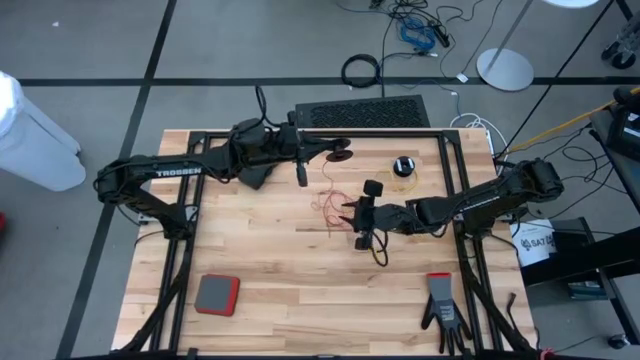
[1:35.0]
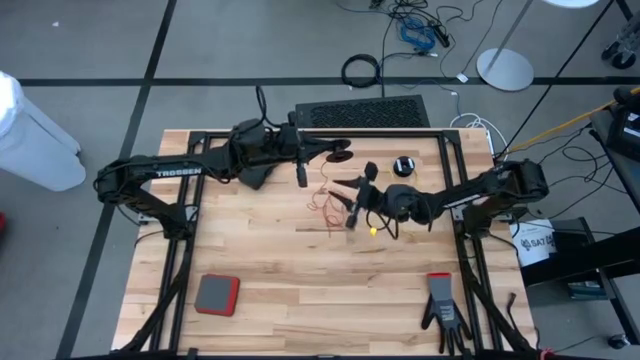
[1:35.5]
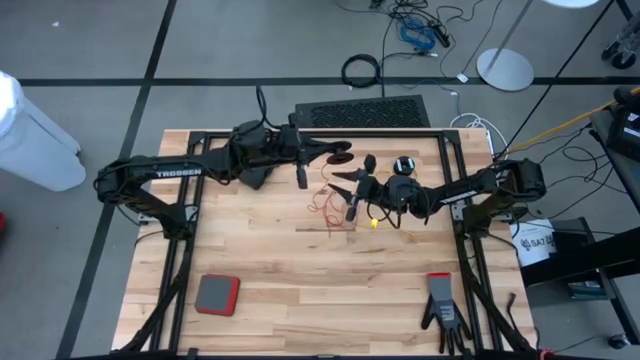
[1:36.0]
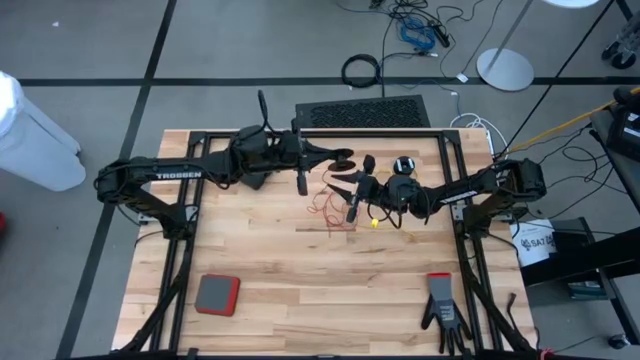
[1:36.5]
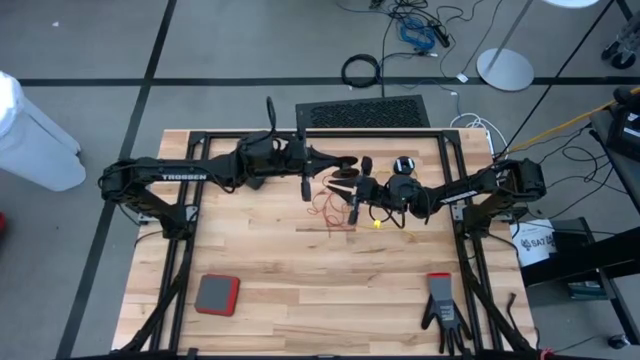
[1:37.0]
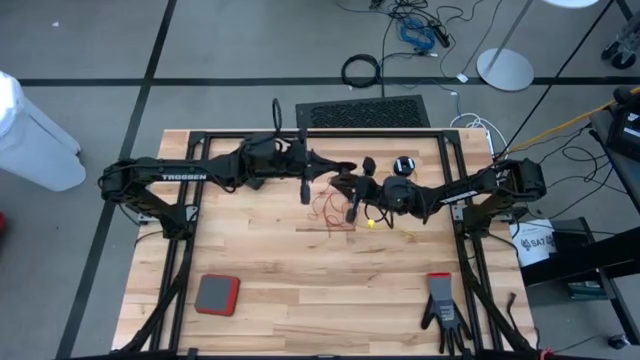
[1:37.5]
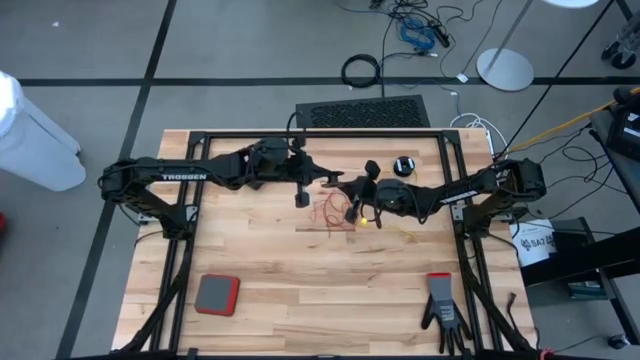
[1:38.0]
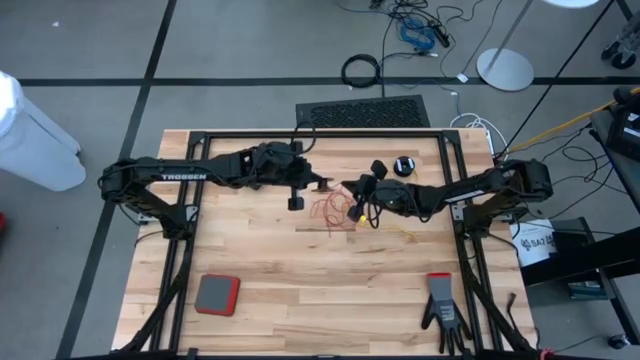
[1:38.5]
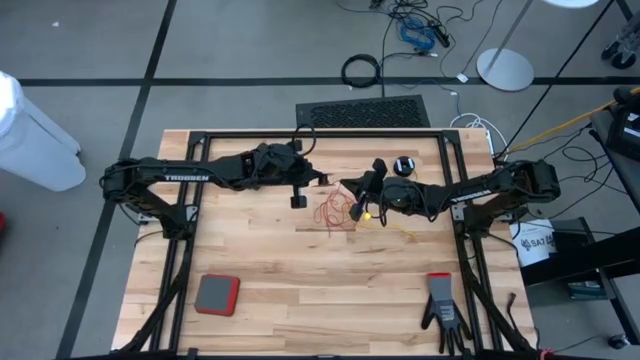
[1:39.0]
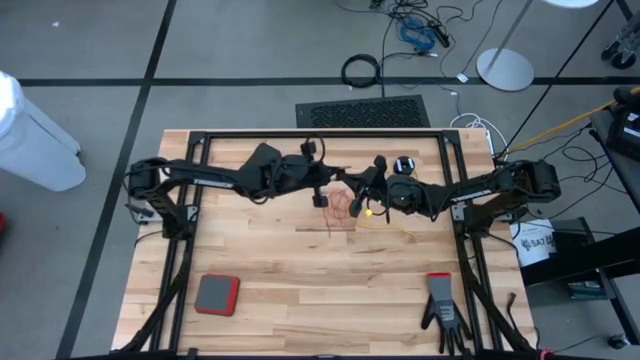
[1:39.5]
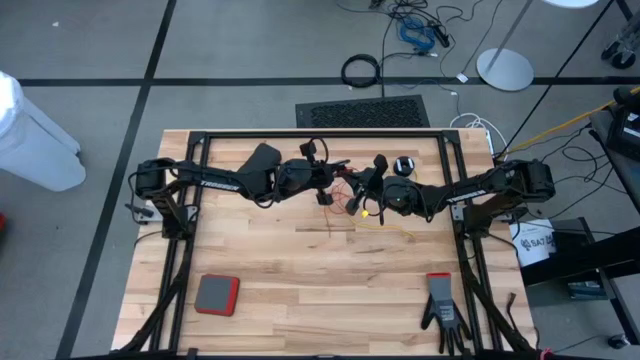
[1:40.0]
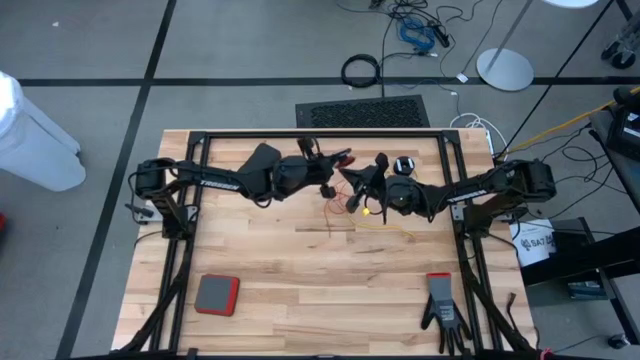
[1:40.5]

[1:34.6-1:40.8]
Task: Coil cords
Coil the red wire on the spool

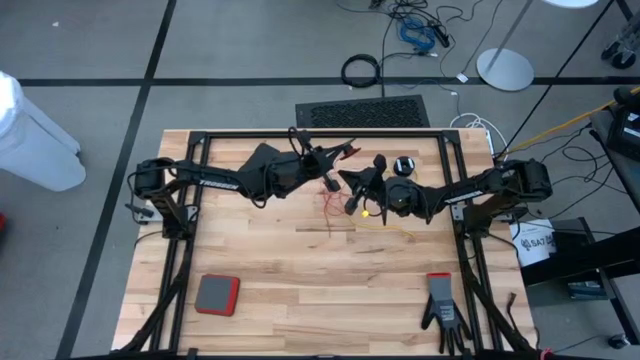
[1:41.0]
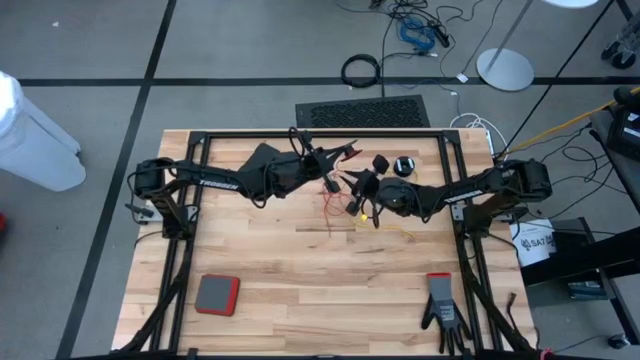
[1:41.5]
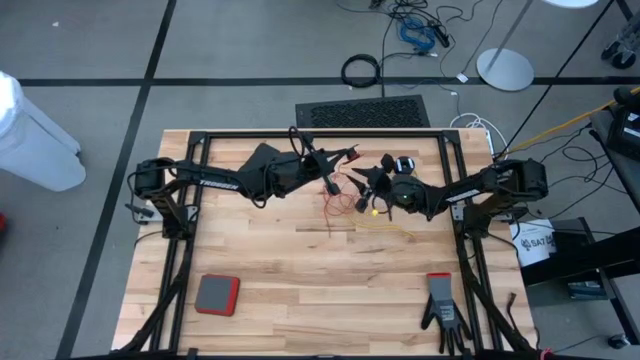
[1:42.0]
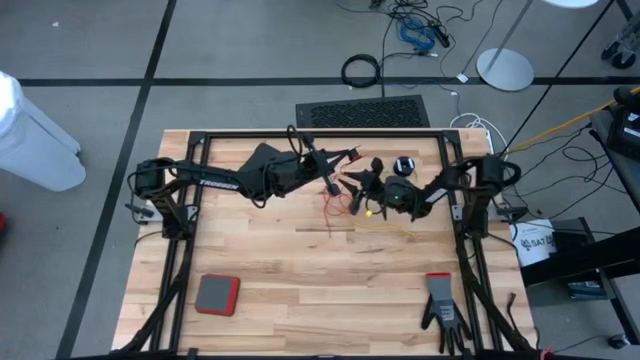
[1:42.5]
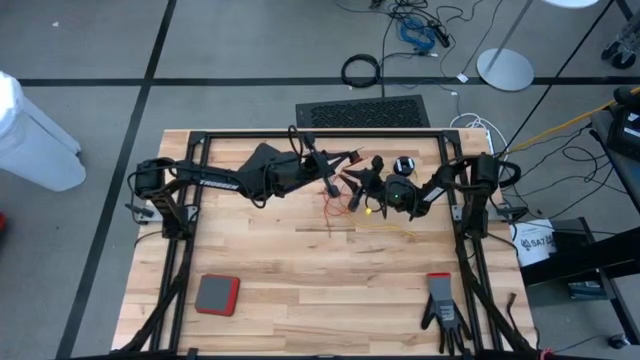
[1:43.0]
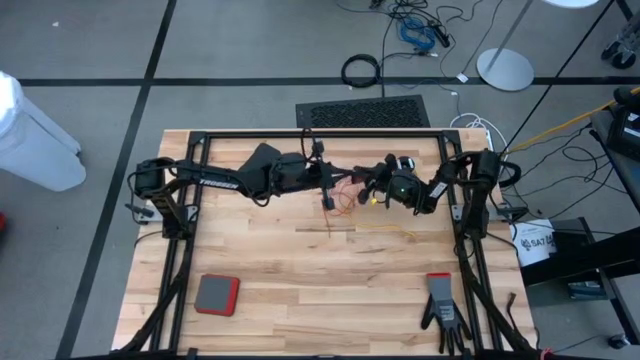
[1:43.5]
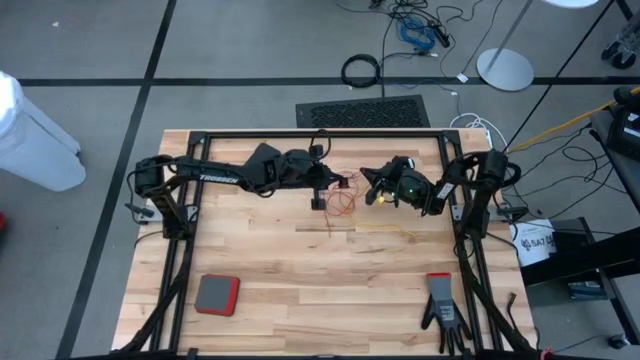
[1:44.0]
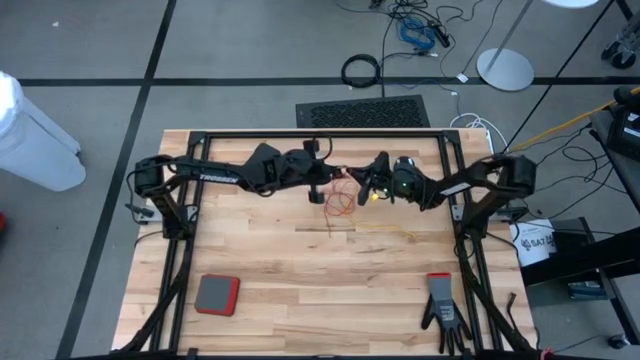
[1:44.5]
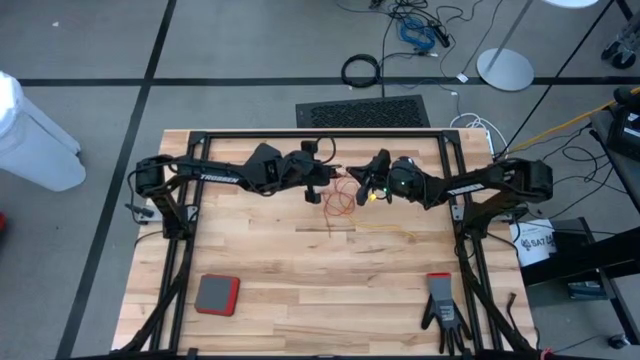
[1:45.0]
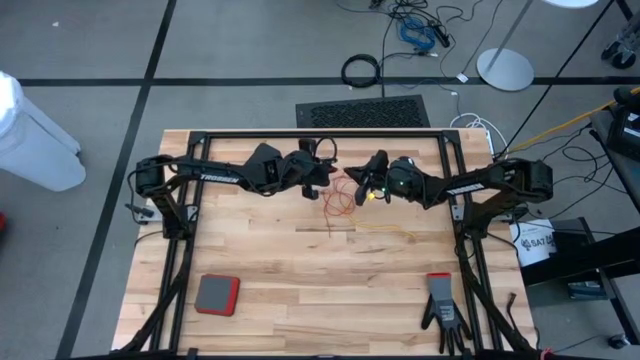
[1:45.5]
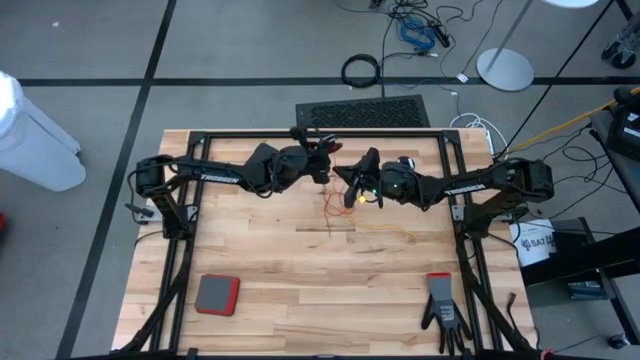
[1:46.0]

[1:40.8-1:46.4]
Coil the red wire on the spool

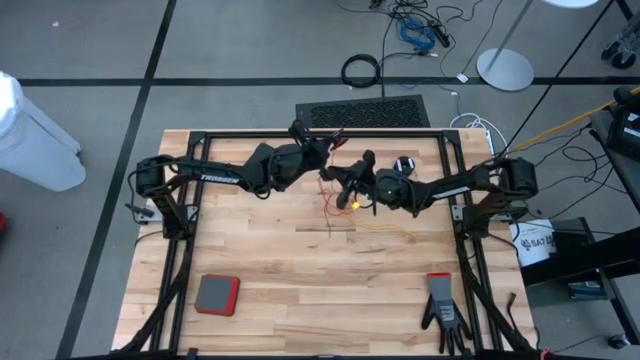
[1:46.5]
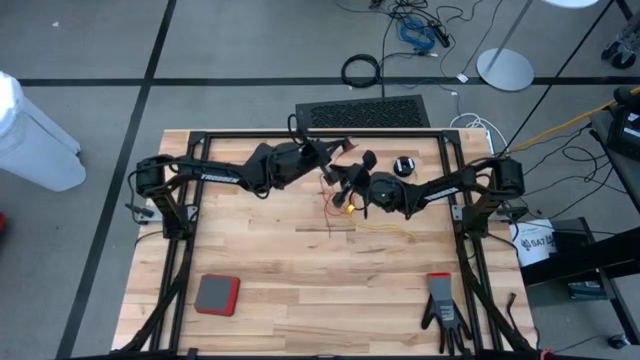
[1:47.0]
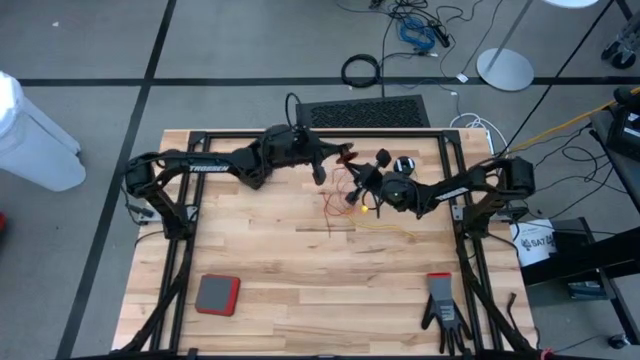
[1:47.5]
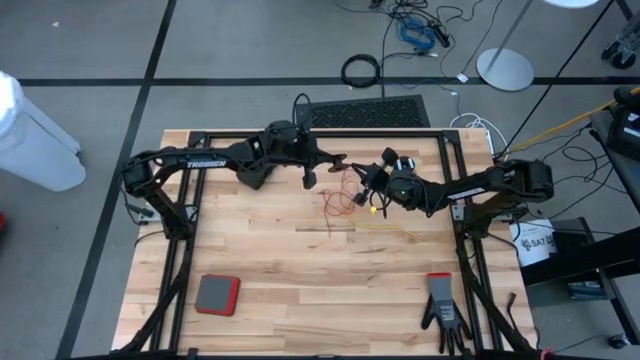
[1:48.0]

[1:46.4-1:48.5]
Coil the red wire on the spool

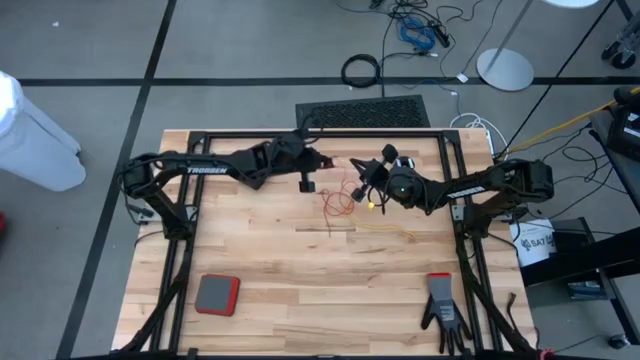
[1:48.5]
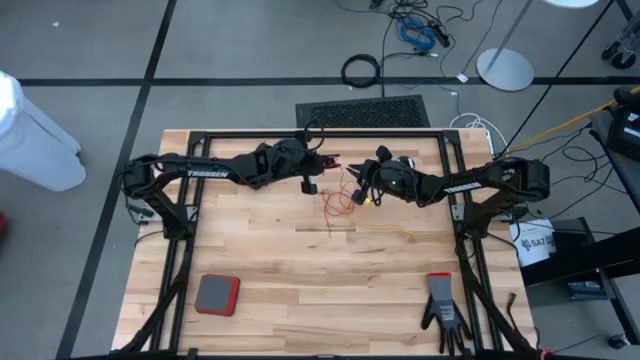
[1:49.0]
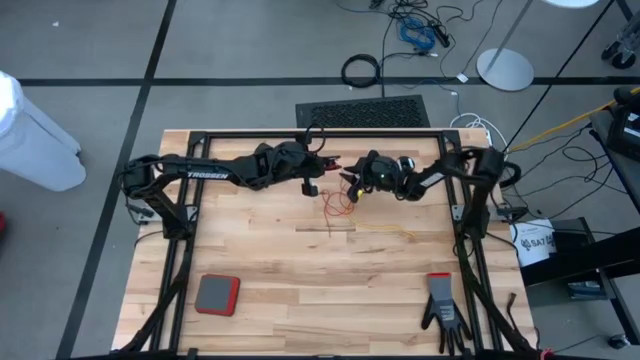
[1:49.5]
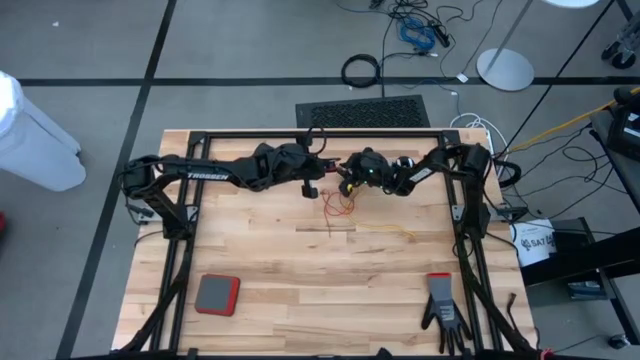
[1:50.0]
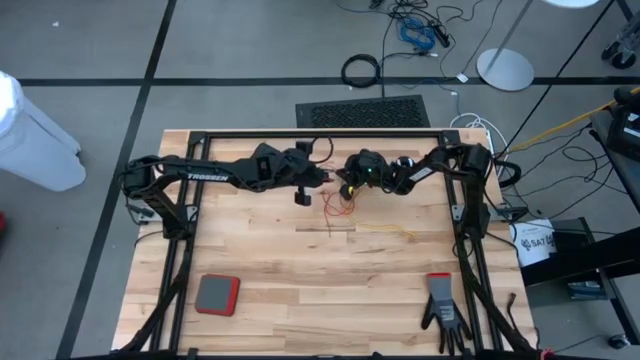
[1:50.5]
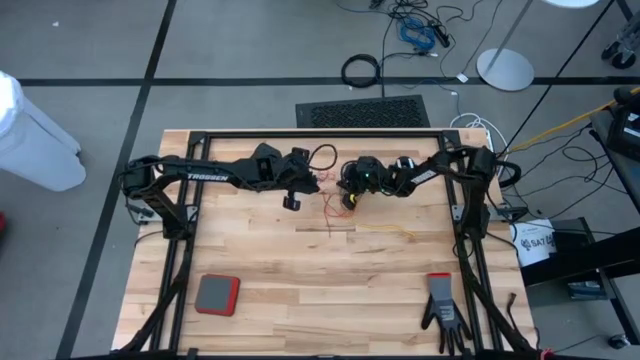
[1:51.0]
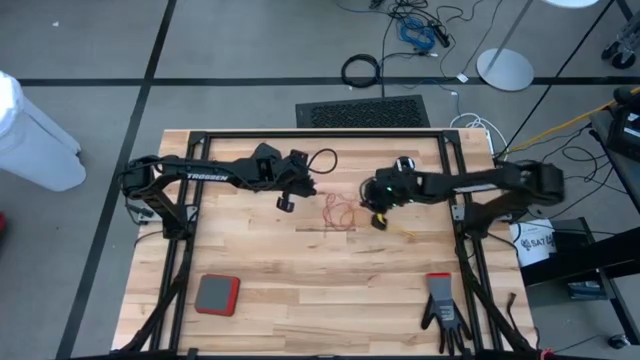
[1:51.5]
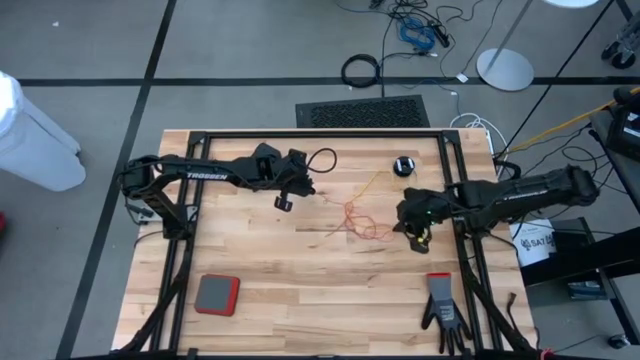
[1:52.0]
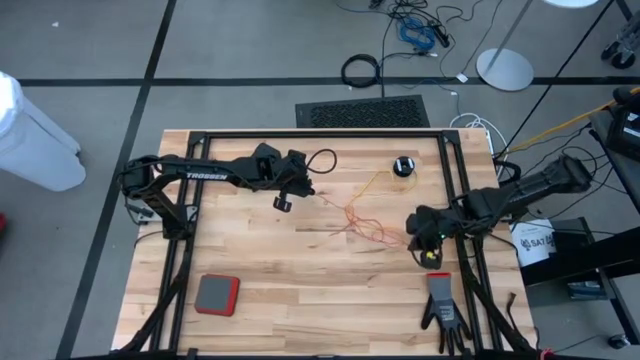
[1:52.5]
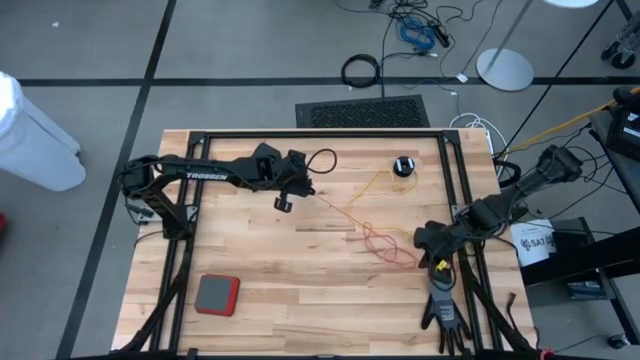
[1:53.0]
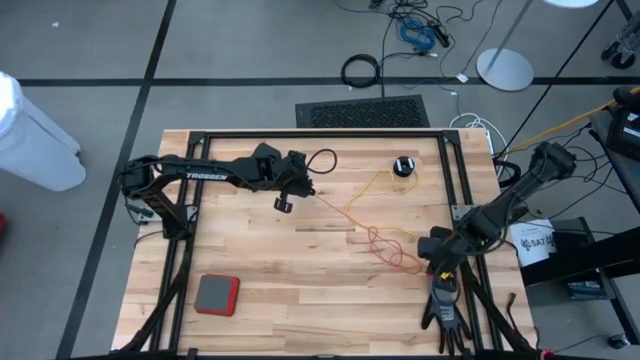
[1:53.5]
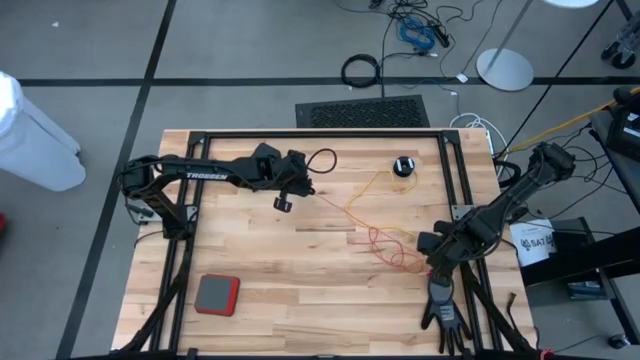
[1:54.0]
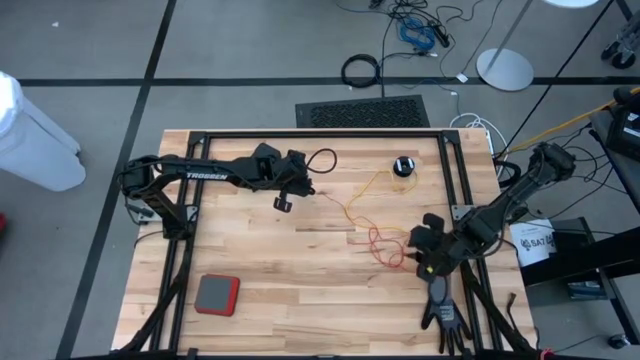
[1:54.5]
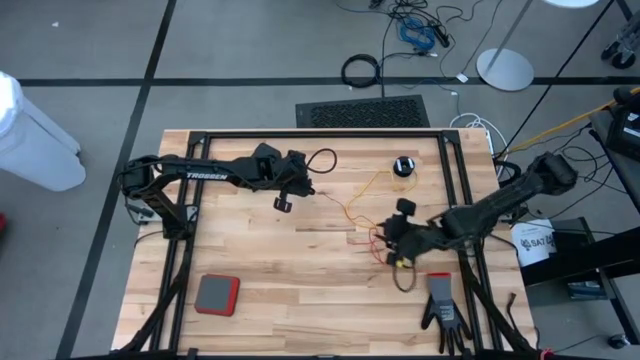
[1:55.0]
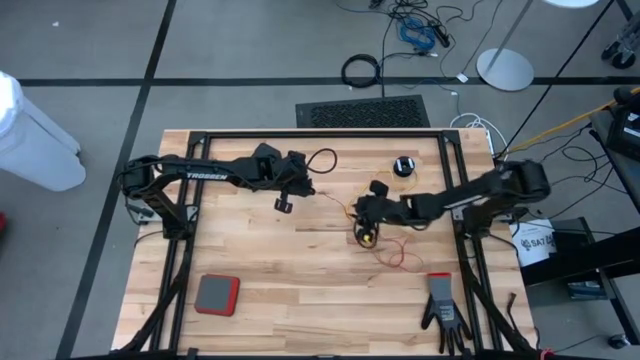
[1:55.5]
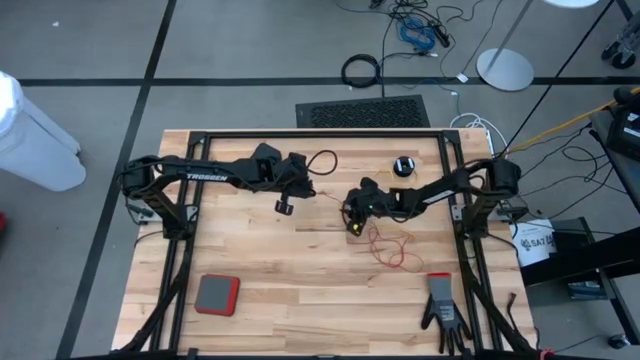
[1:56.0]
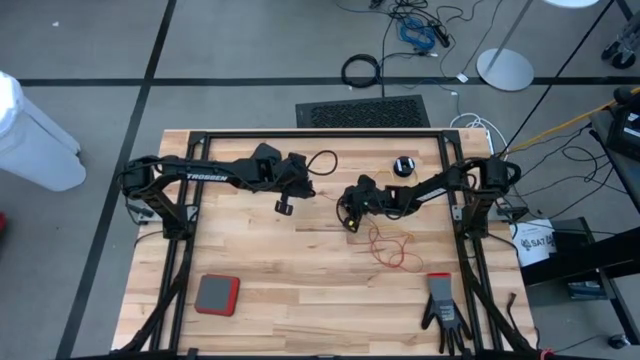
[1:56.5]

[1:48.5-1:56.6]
Coil the red wire on the spool

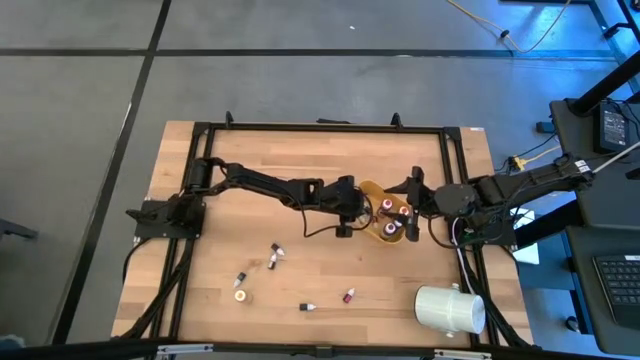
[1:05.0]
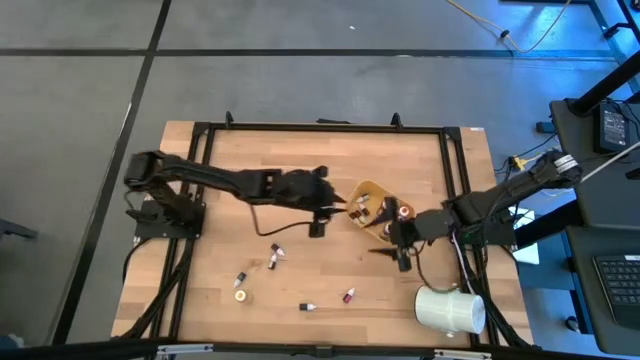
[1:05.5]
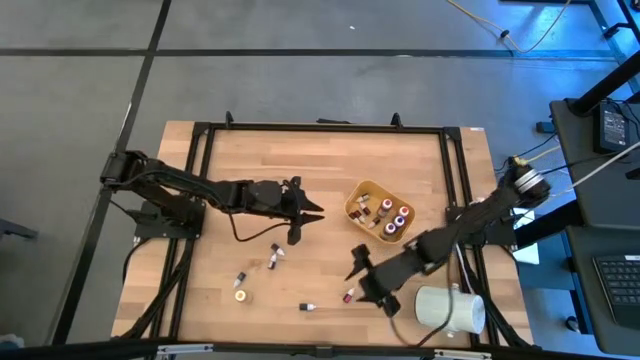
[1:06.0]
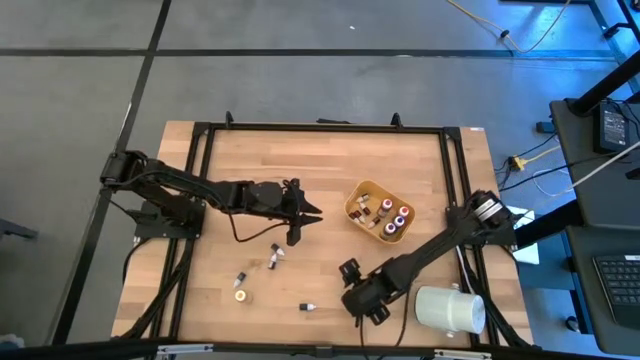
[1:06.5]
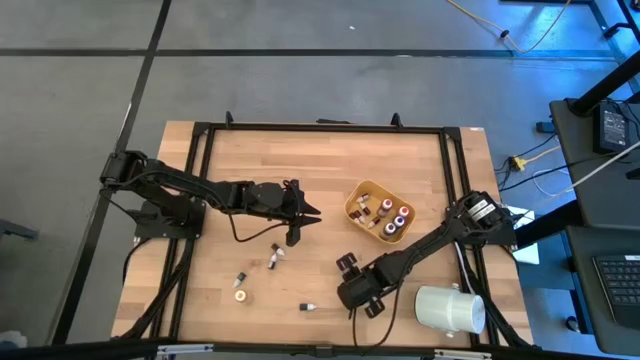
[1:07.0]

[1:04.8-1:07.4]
Task: Pick & Place food coloring
Put the small pink food coloring bottle in the yellow bin
